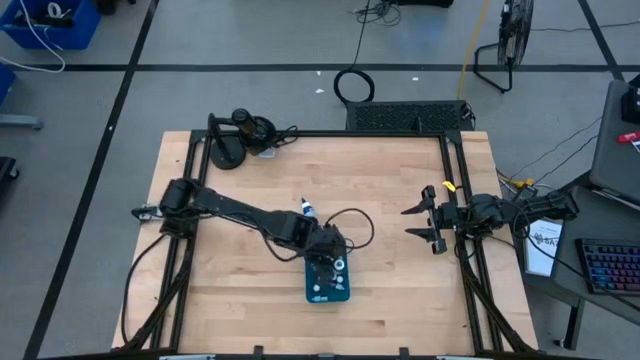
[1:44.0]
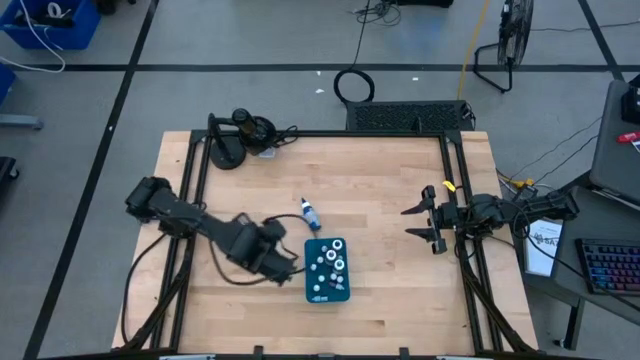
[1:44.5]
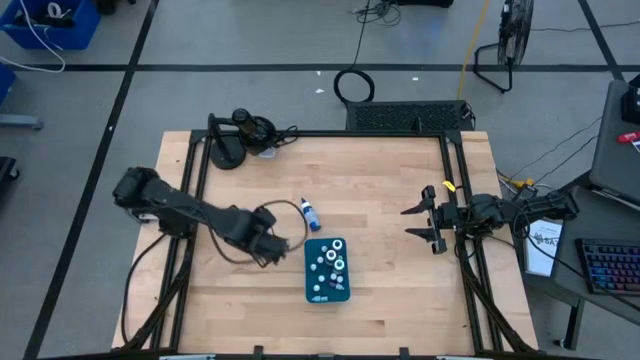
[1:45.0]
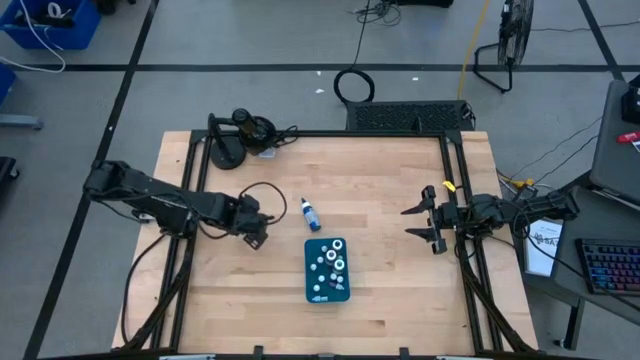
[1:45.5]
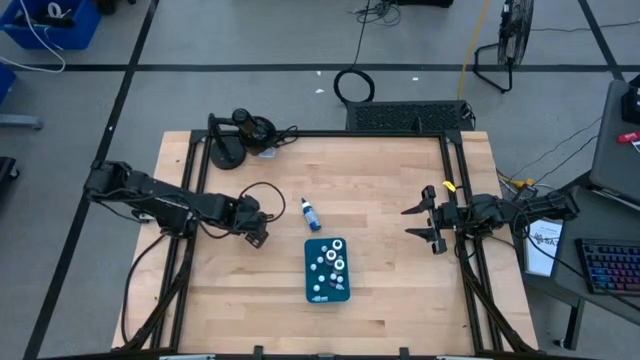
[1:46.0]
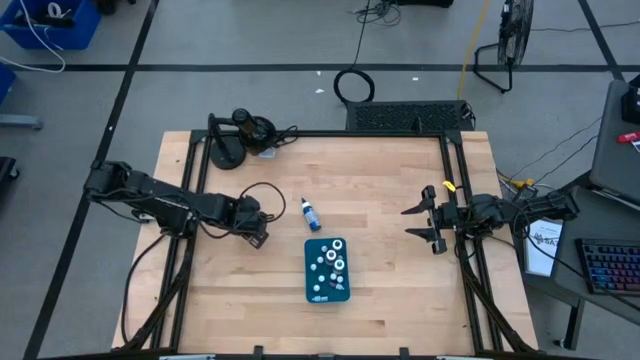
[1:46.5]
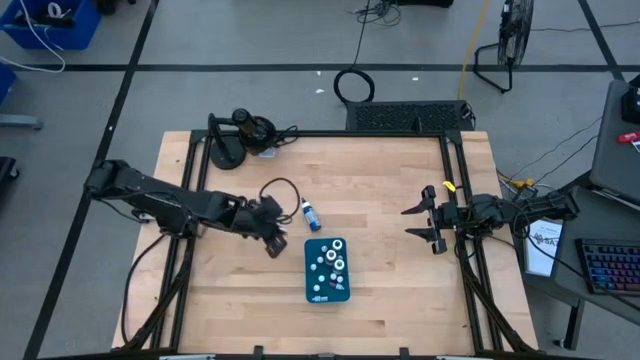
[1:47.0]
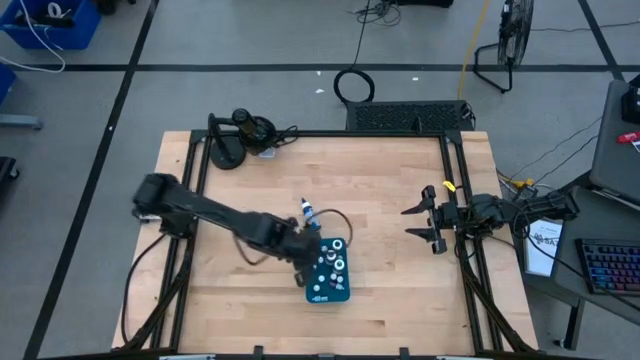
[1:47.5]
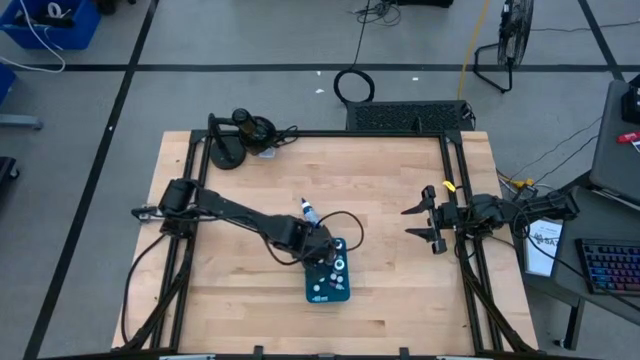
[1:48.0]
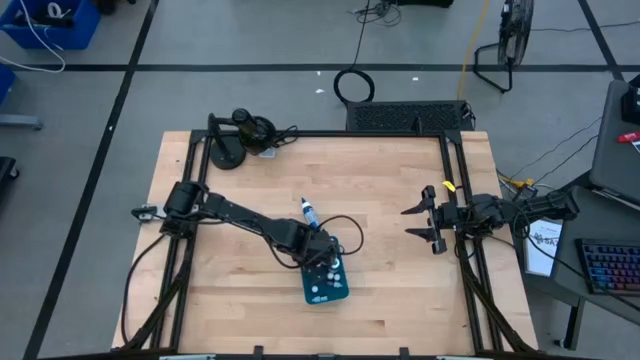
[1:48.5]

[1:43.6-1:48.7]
Task: Pick & Place food coloring
Put the orange small food coloring bottle into the blue bin

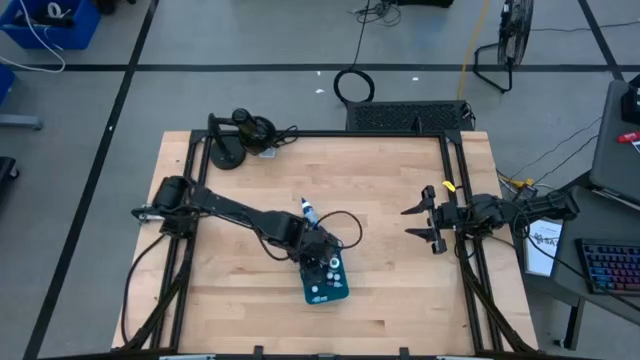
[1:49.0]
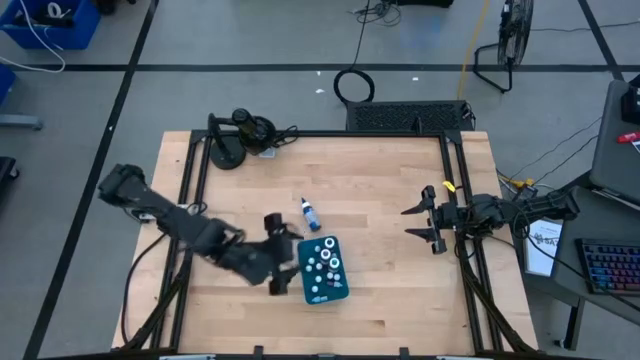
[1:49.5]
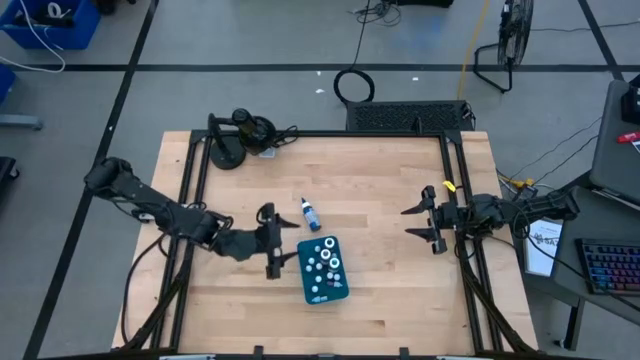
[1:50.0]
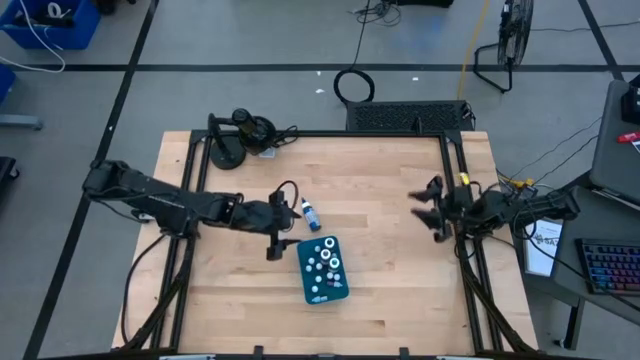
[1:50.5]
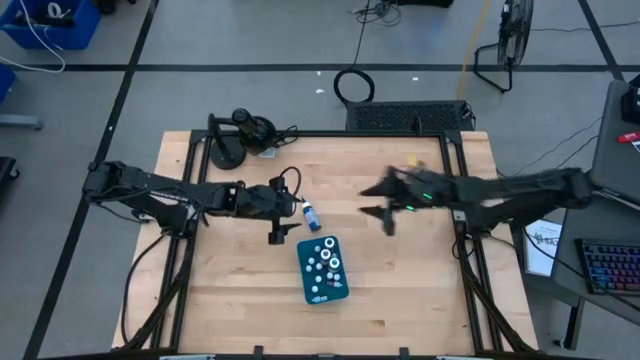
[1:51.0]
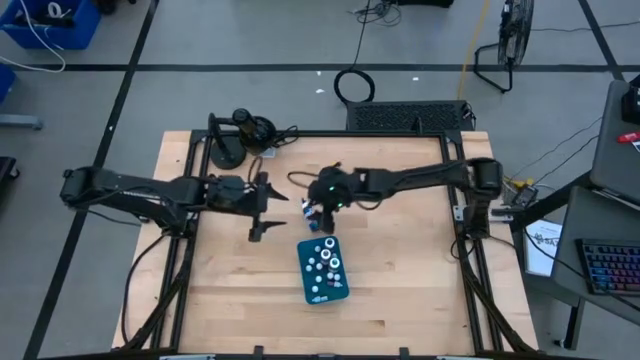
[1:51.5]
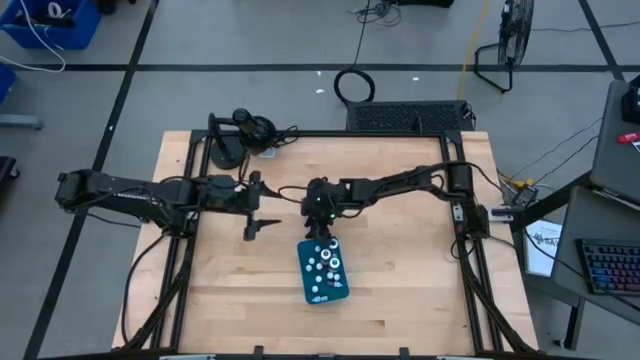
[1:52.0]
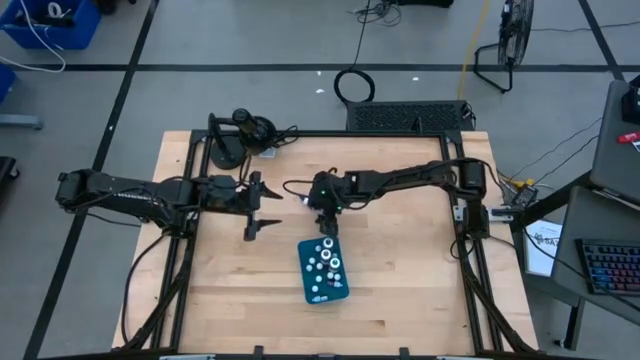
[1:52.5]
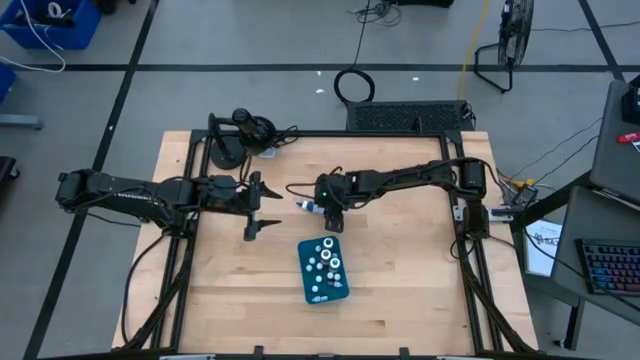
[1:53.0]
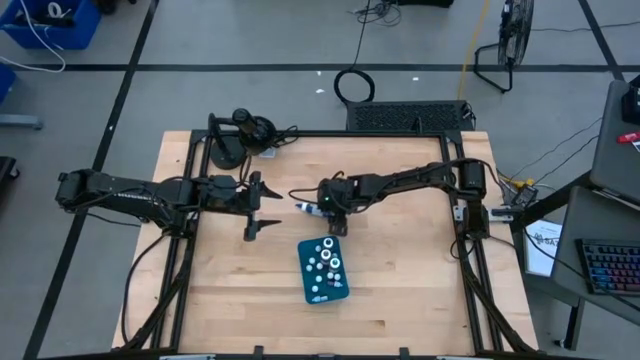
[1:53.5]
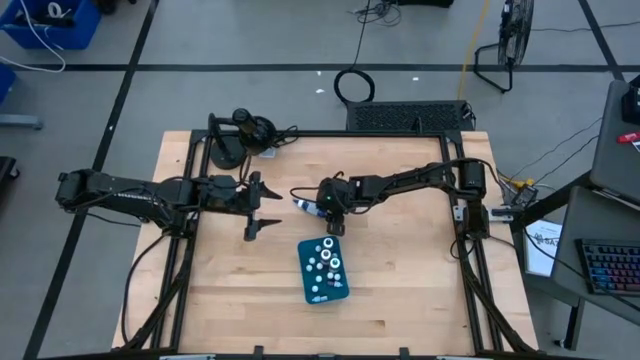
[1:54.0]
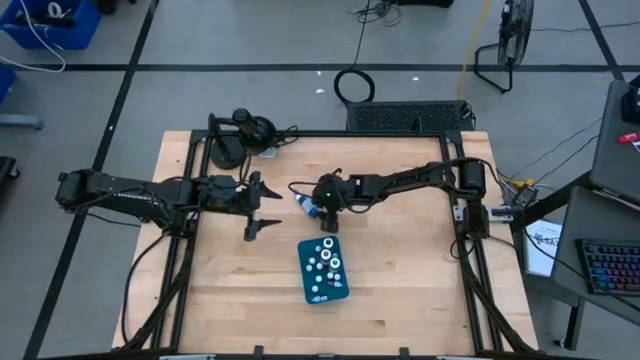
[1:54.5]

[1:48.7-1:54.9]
Put the blue big food coloring bottle into the blue bin

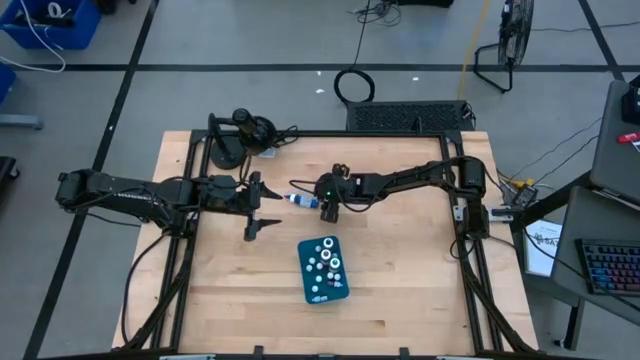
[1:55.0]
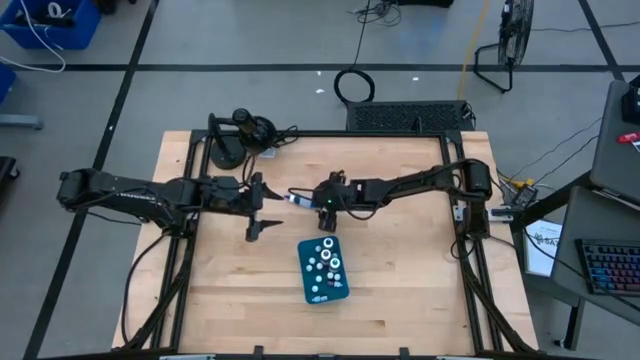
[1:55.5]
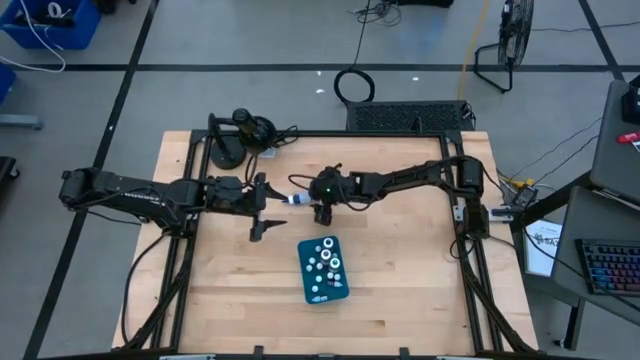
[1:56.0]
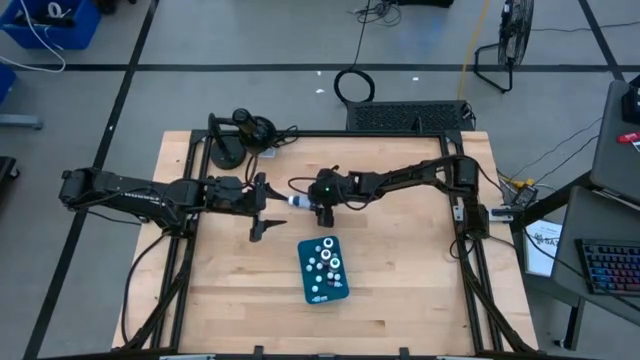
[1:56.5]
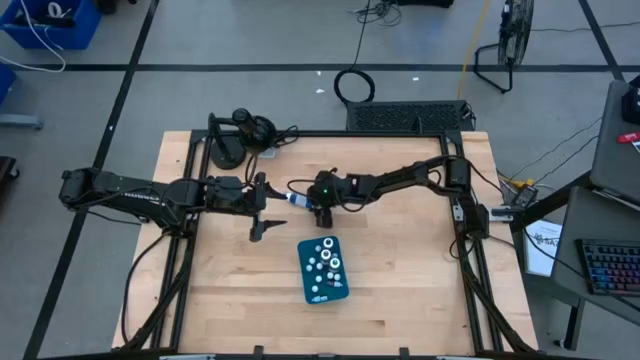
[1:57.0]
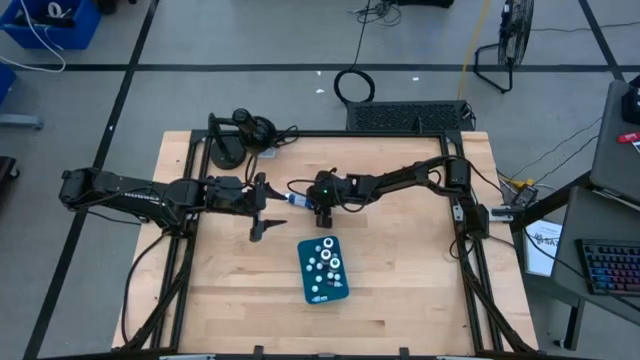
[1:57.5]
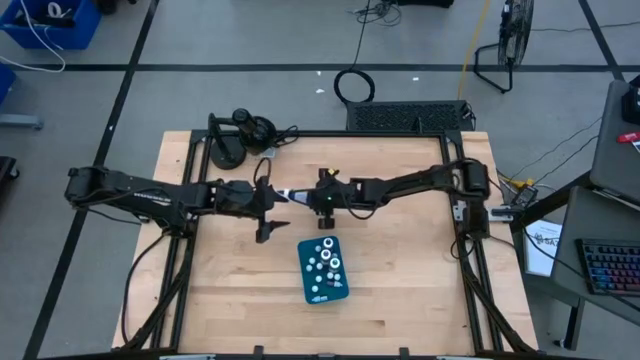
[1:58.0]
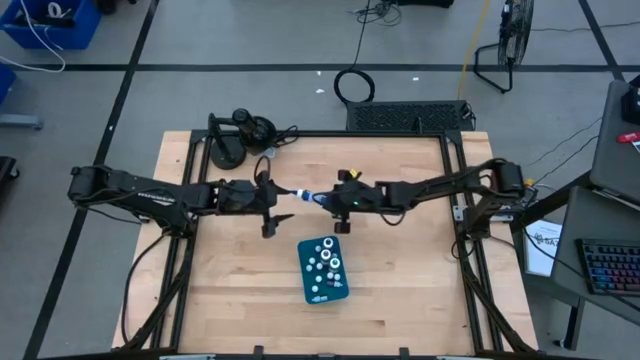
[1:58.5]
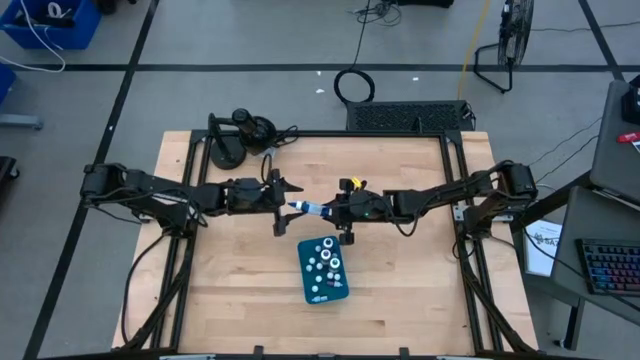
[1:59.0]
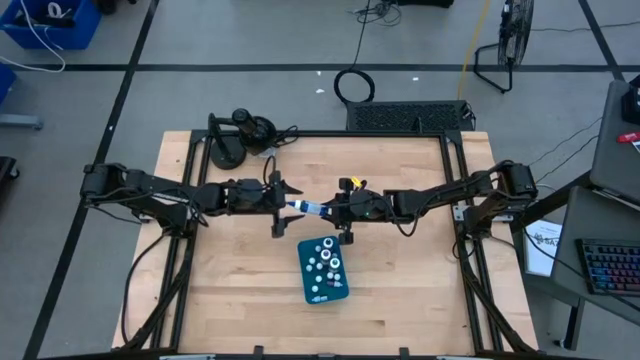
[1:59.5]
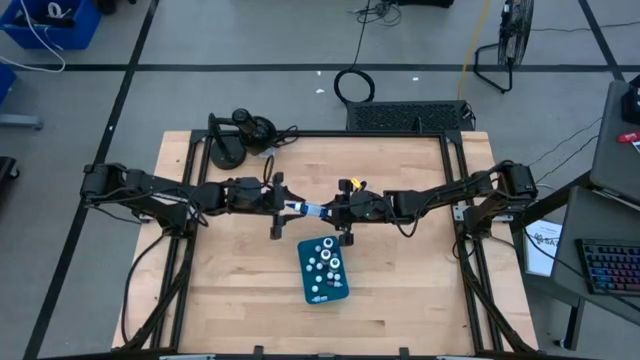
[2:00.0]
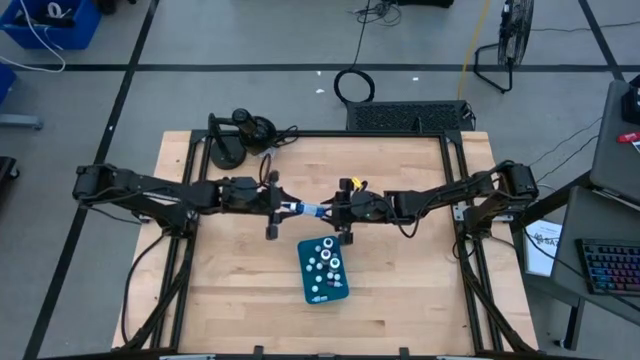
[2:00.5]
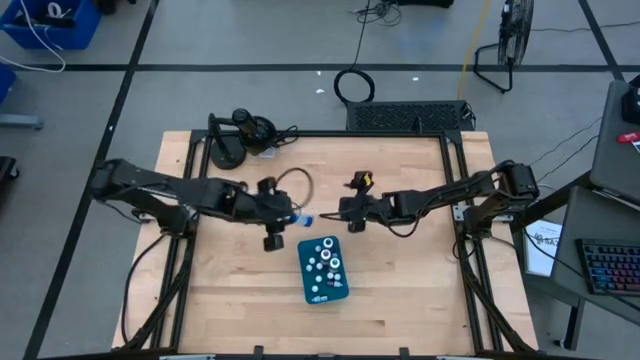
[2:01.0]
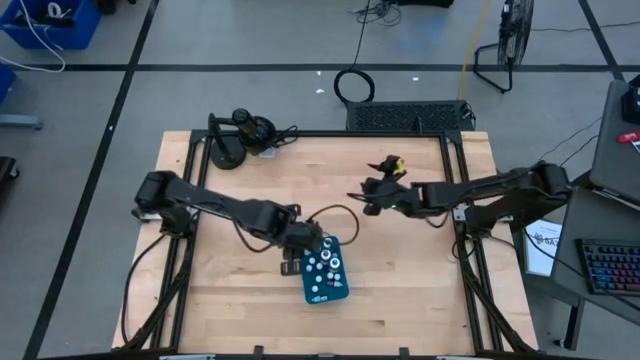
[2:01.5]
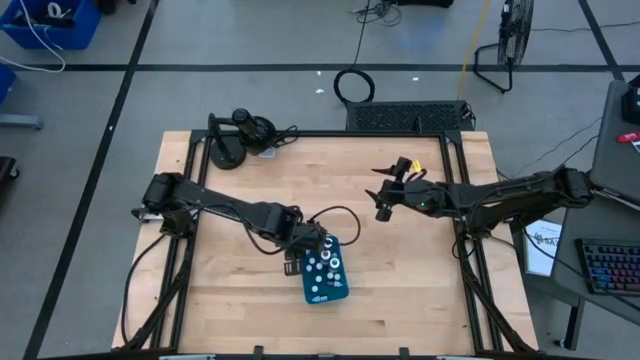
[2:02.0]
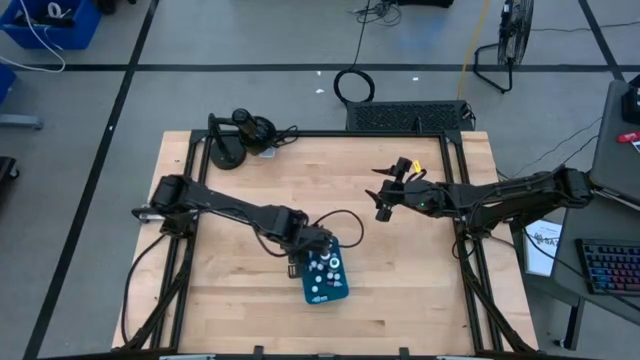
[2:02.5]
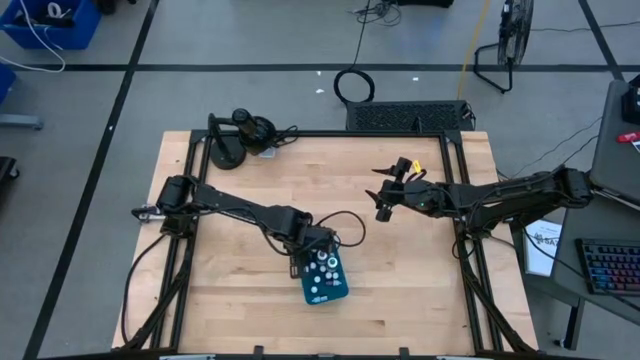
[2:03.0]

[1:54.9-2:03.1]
Put the blue big food coloring bottle into the blue bin

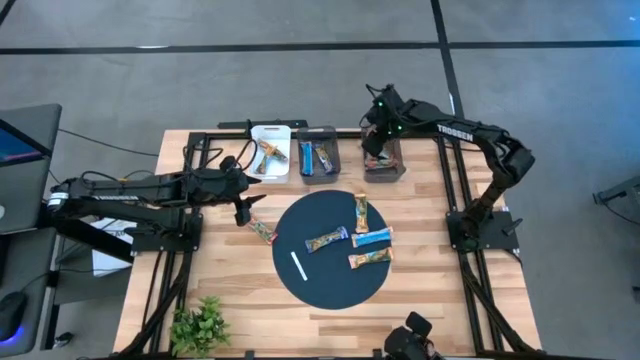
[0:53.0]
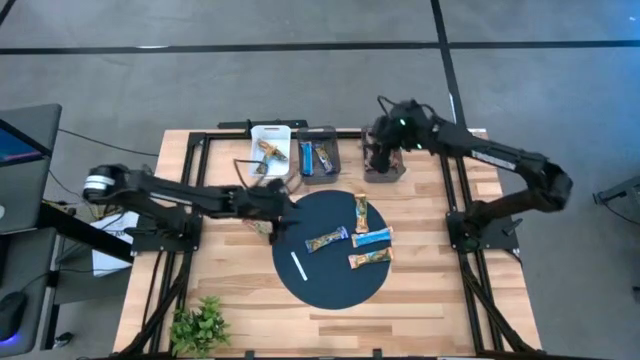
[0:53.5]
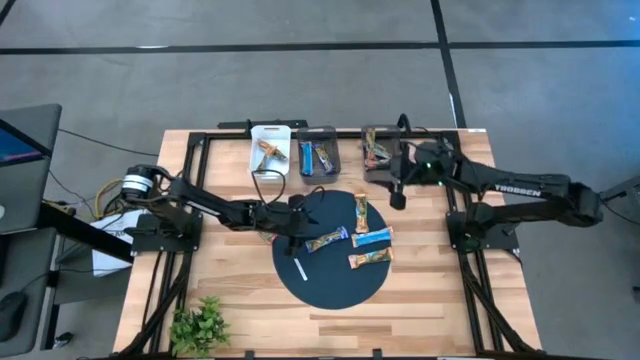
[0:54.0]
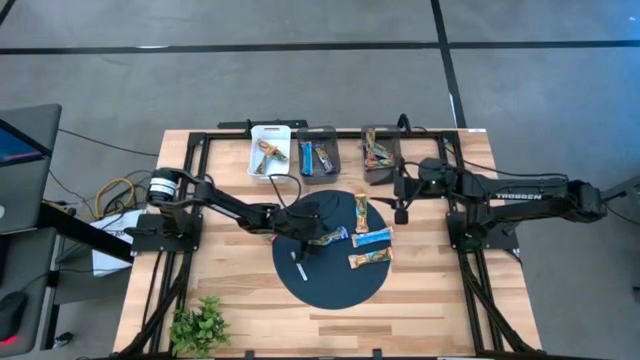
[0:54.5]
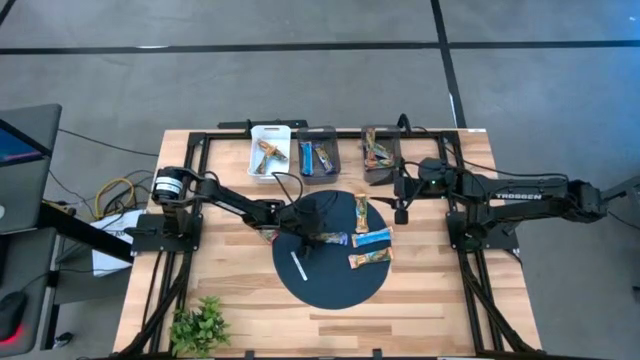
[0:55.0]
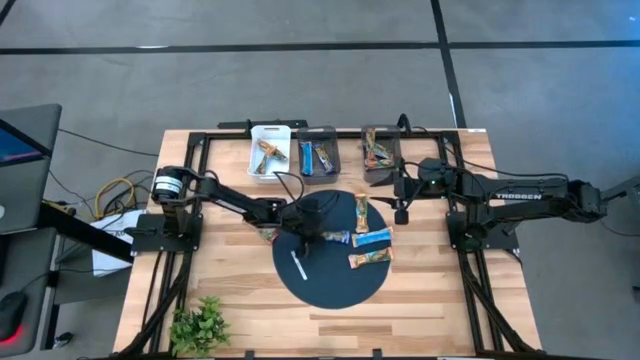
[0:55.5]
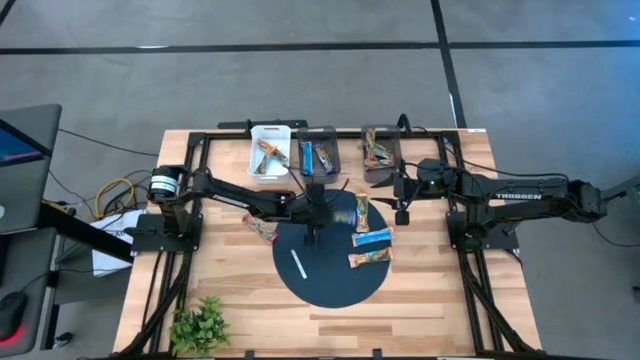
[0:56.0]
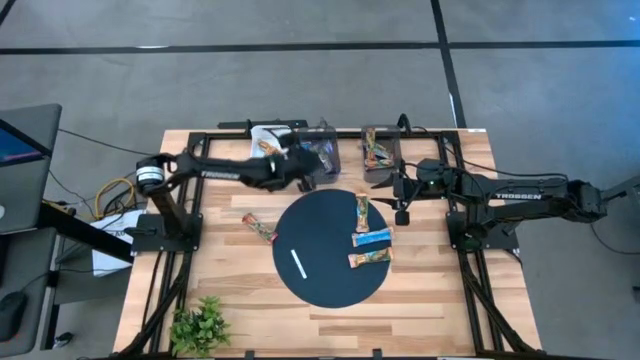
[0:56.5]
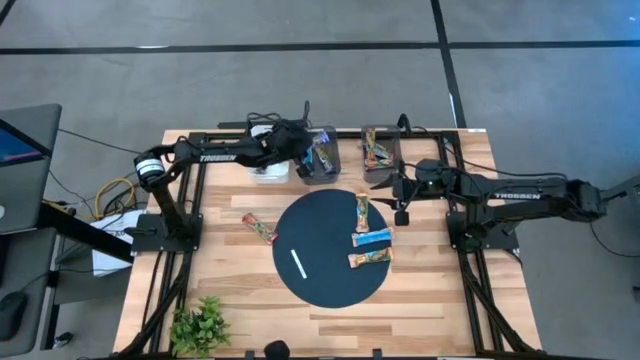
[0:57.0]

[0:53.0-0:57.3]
Task: Pick and place Granola Bars by type
Put the blue granola bar into the left black bin
